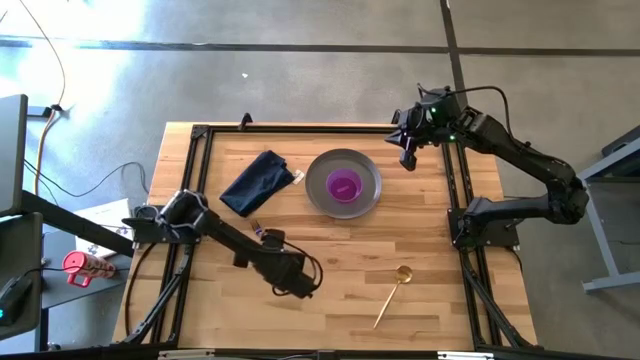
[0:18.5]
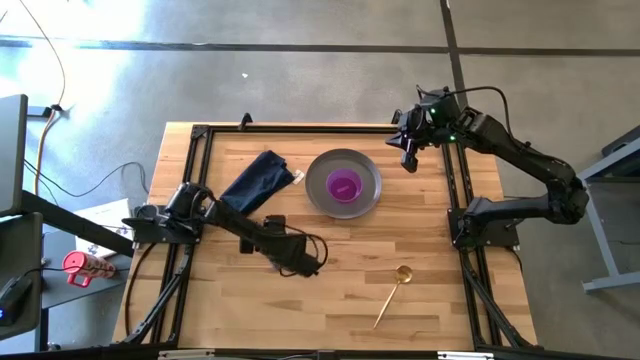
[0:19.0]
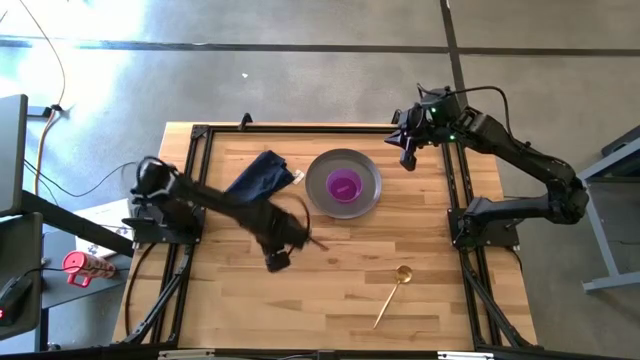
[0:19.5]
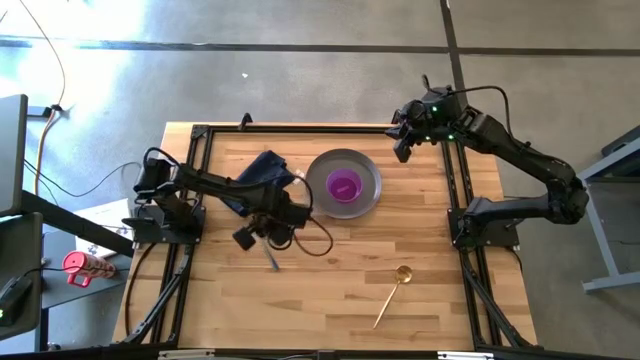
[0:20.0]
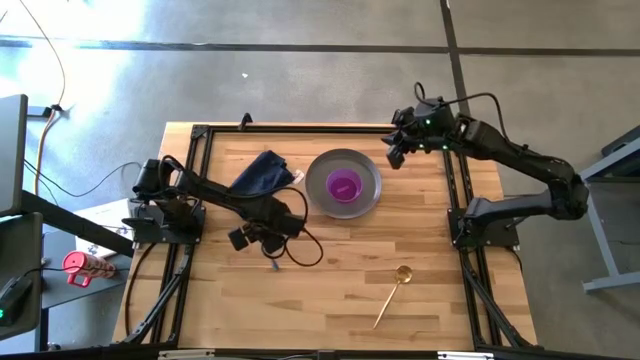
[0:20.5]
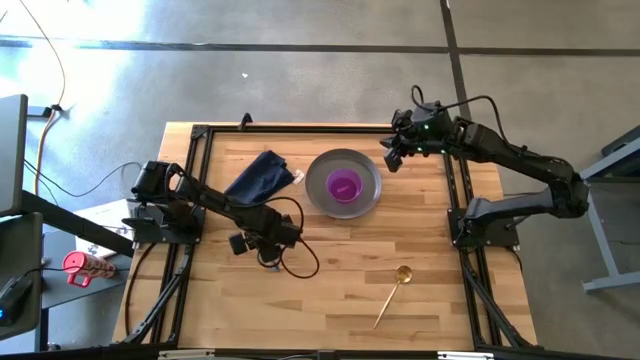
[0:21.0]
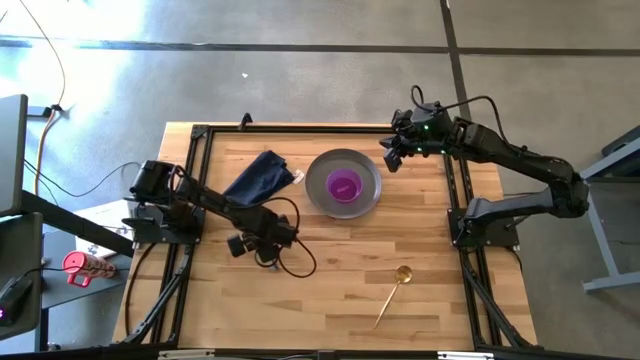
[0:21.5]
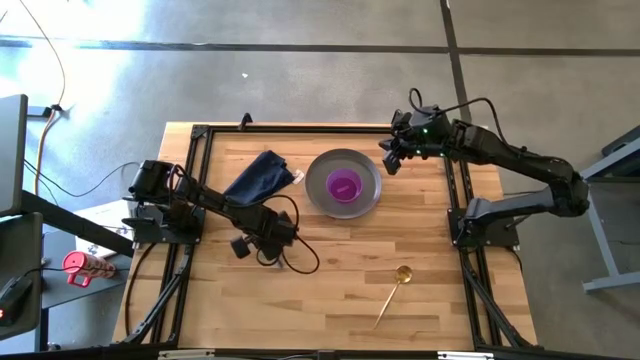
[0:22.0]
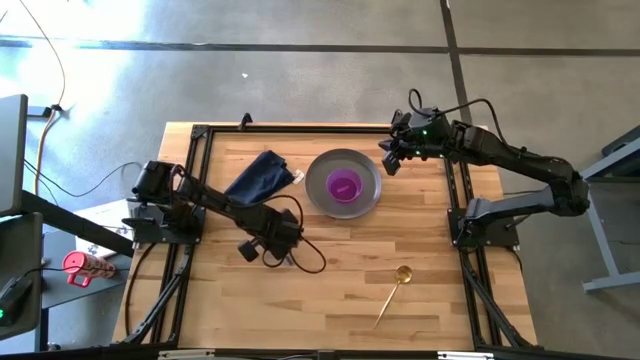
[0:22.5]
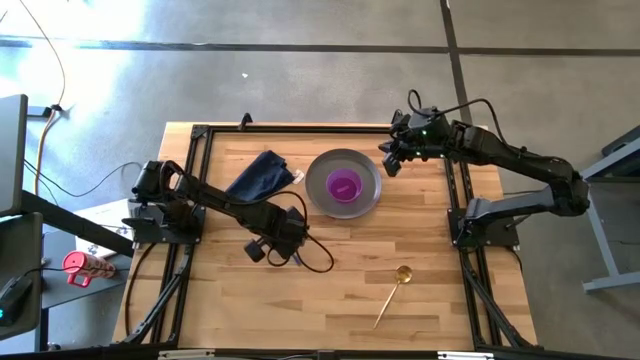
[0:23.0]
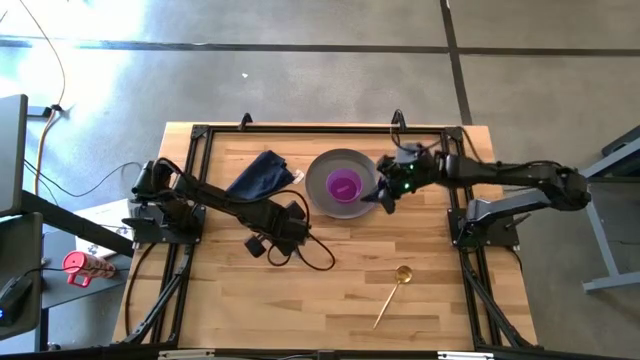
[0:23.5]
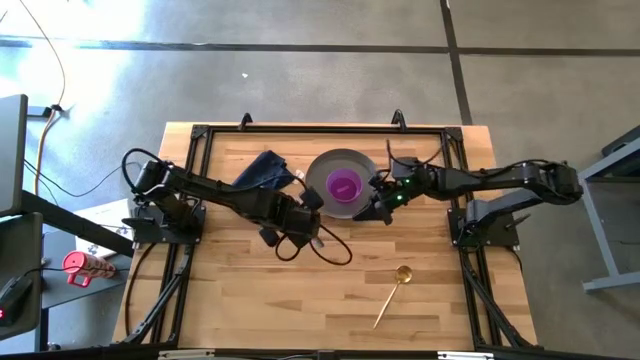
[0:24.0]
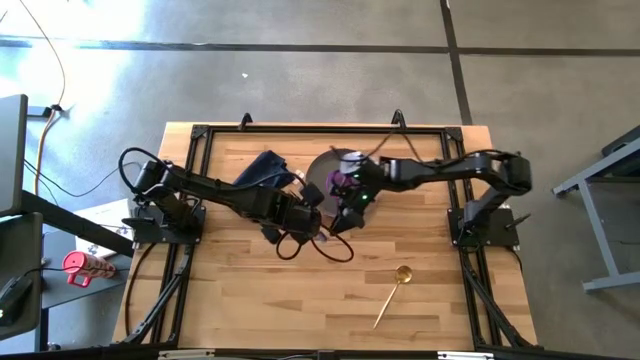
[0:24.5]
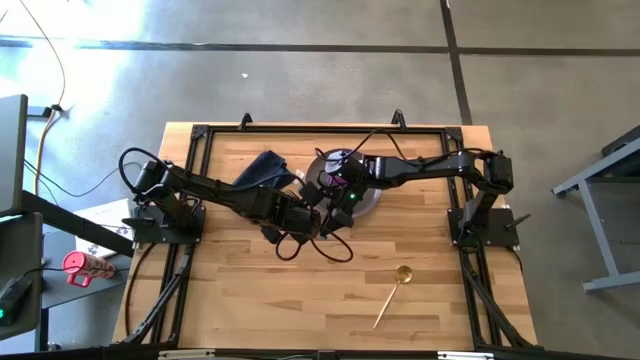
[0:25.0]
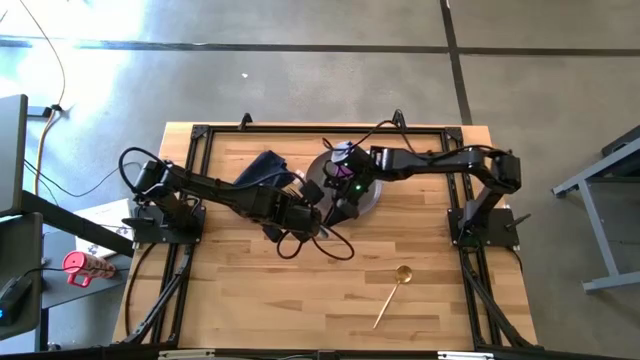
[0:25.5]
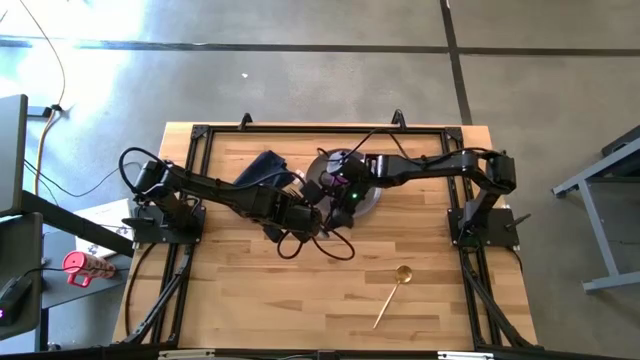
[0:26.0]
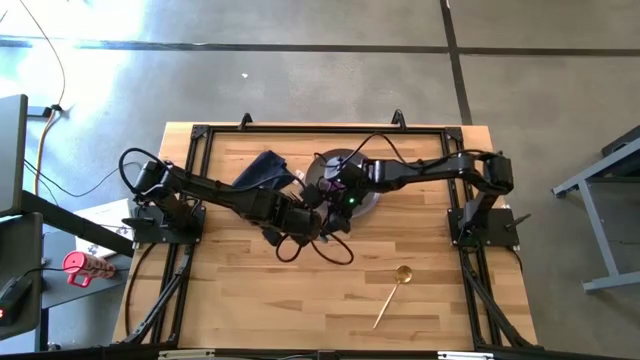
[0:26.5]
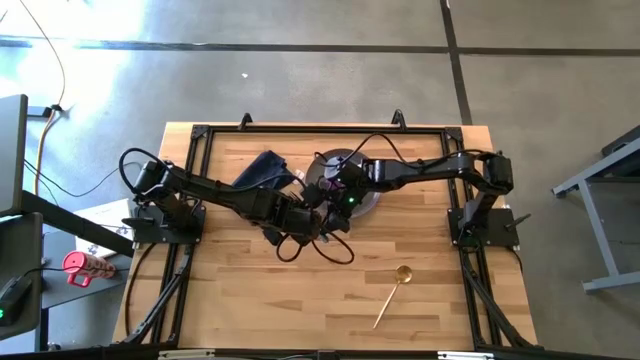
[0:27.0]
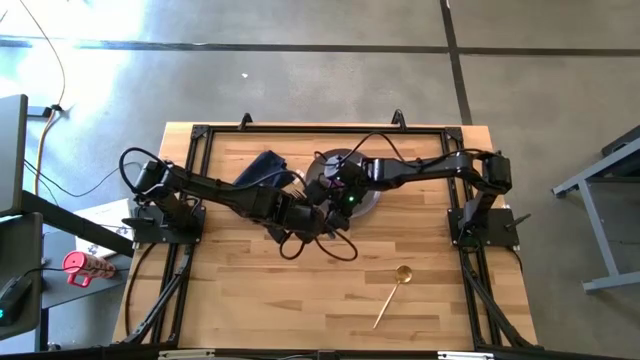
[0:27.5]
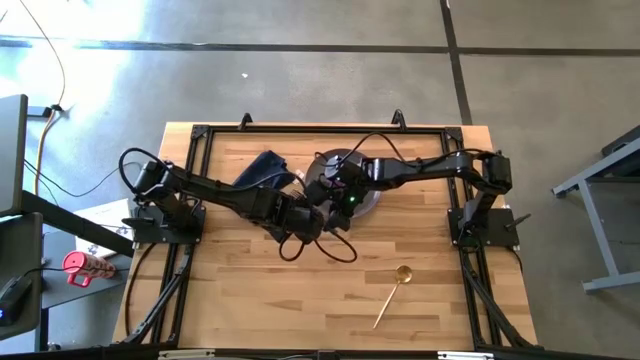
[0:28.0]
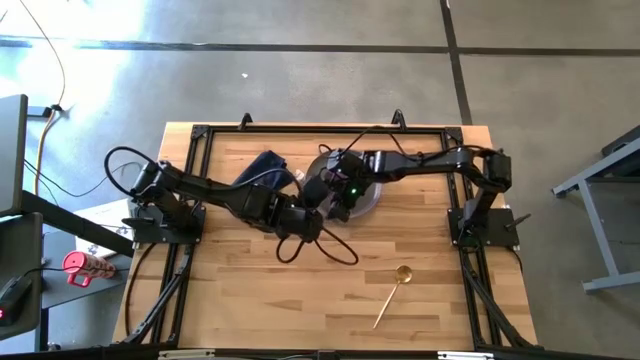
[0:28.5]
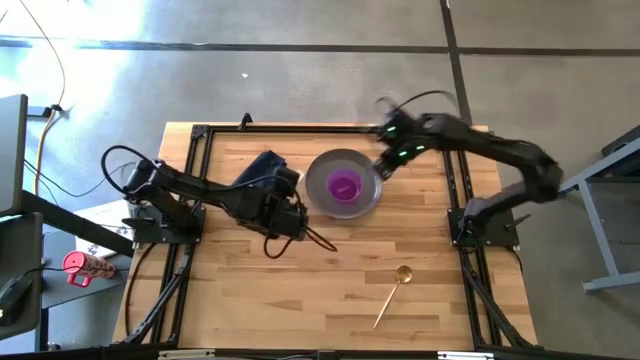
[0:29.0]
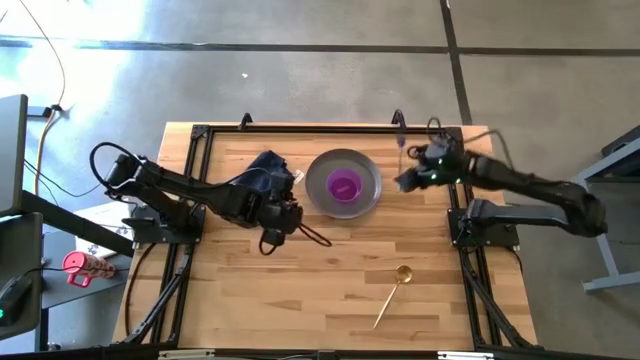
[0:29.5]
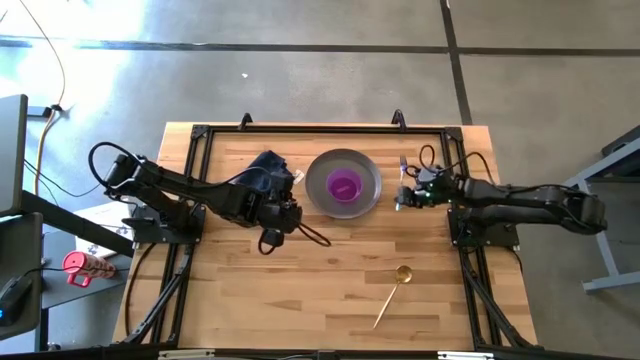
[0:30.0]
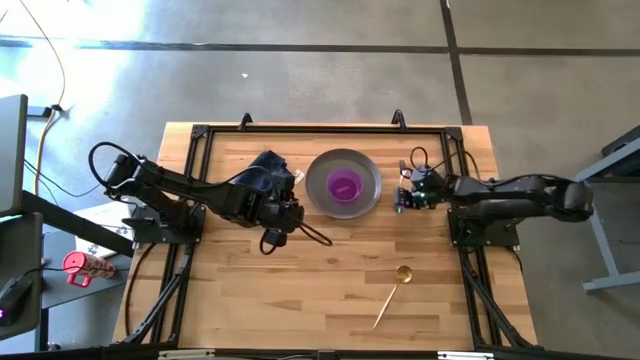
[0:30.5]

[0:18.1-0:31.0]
Task: Set table place
Put the blue fork to the right of the gray plate

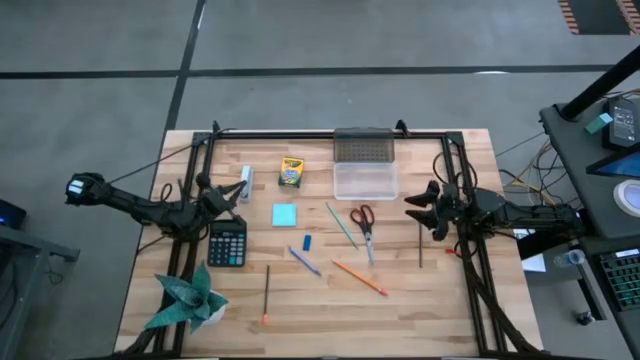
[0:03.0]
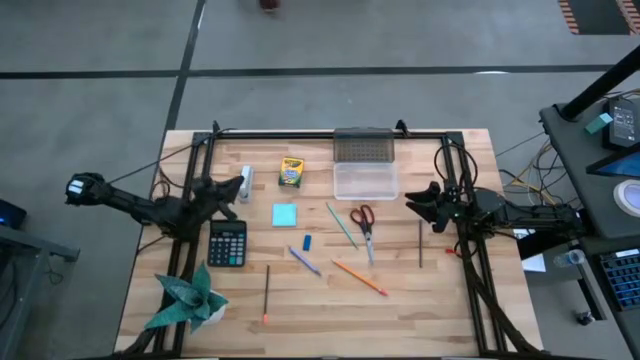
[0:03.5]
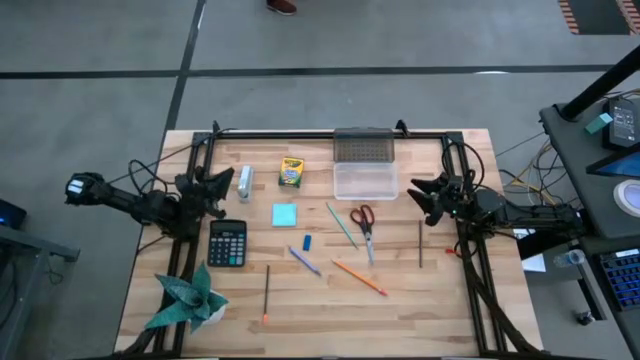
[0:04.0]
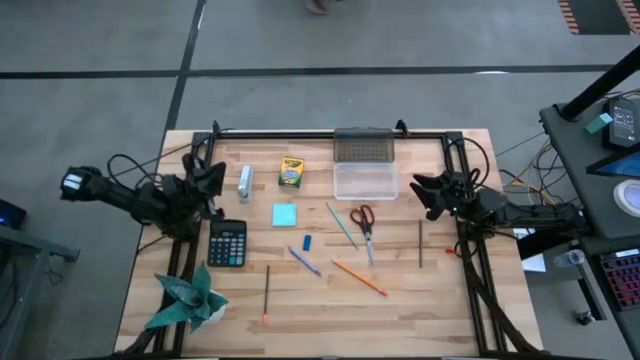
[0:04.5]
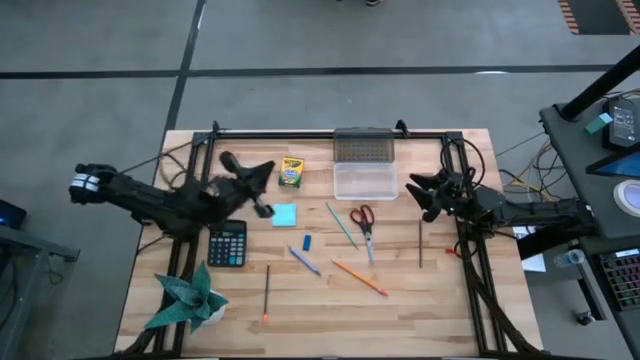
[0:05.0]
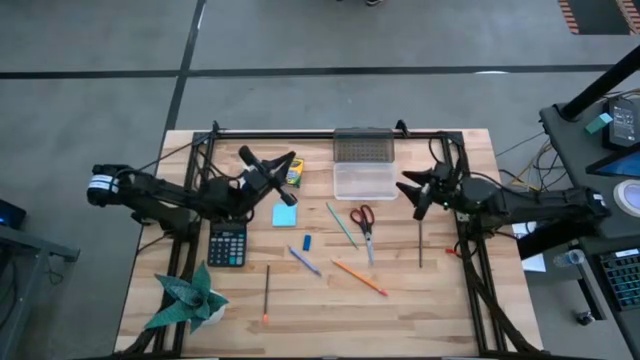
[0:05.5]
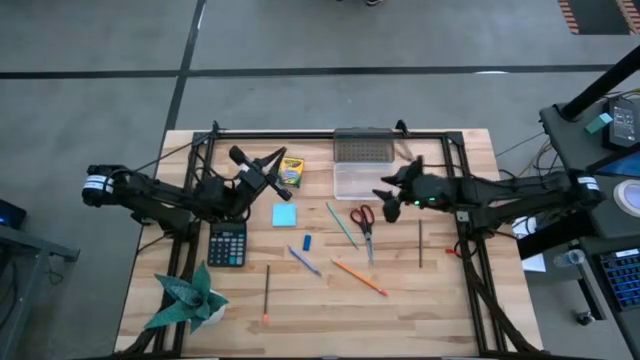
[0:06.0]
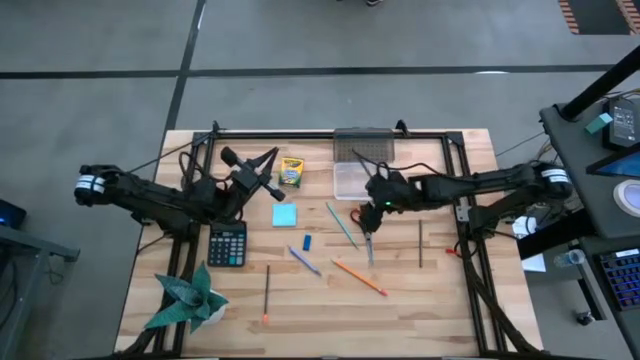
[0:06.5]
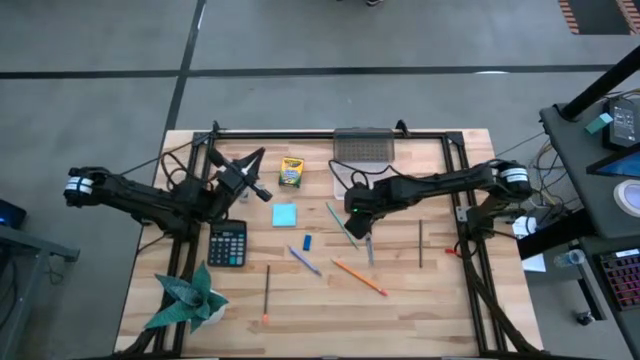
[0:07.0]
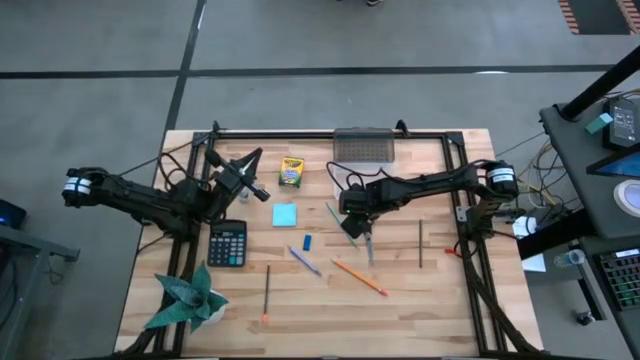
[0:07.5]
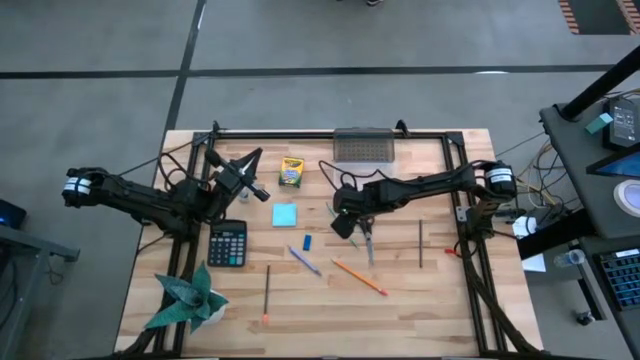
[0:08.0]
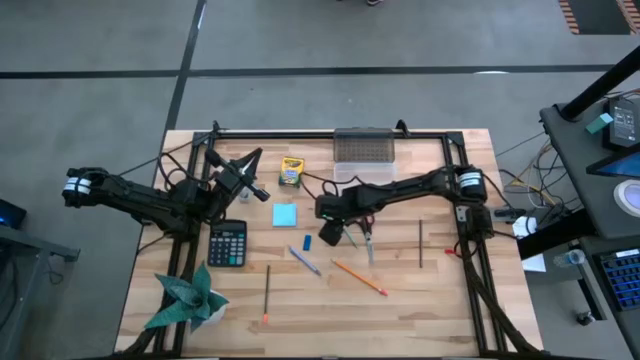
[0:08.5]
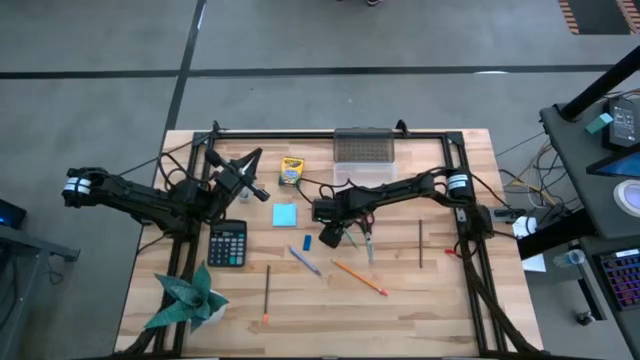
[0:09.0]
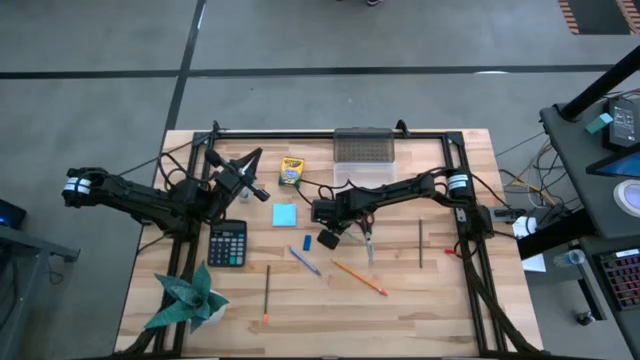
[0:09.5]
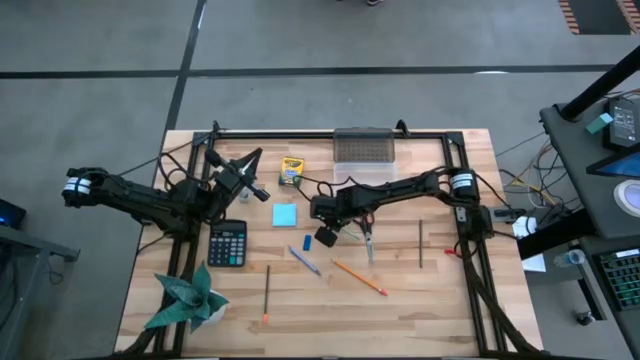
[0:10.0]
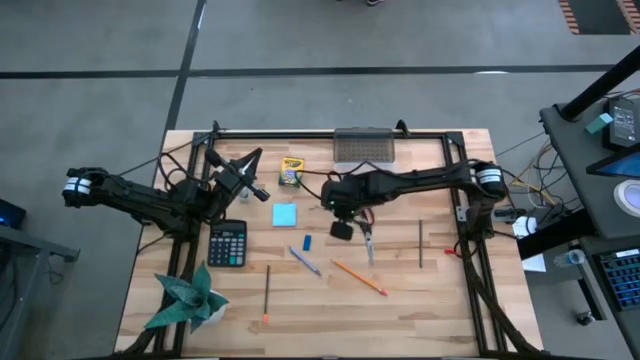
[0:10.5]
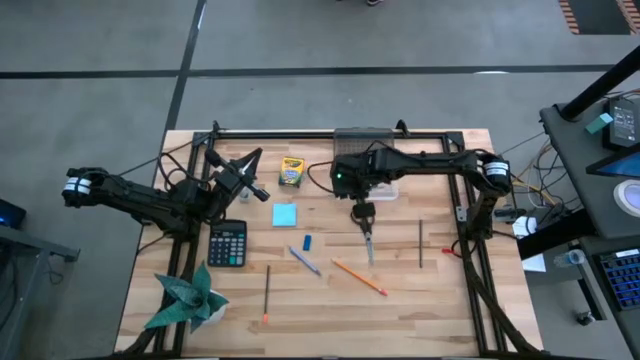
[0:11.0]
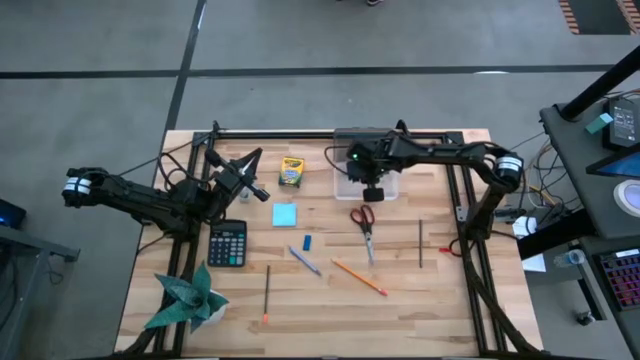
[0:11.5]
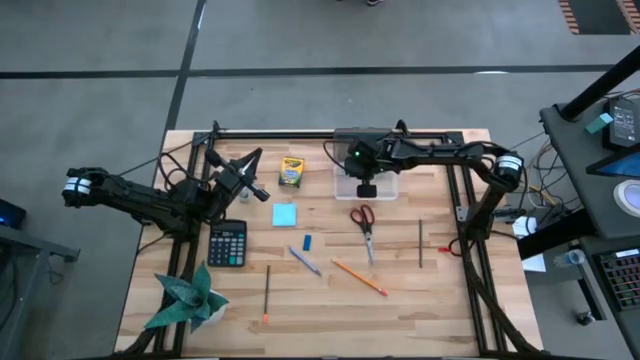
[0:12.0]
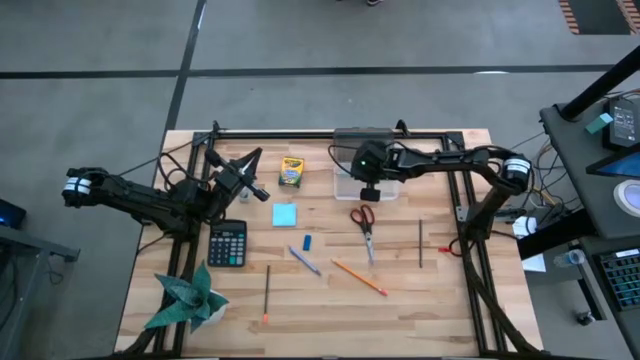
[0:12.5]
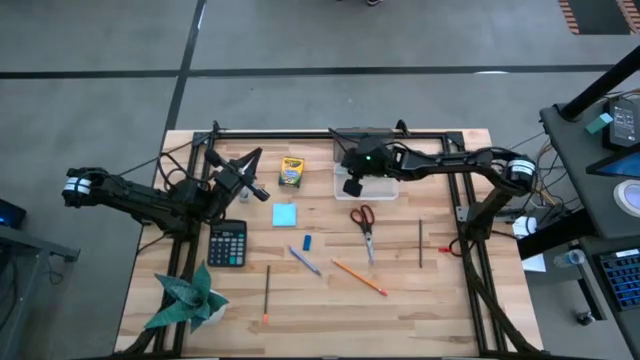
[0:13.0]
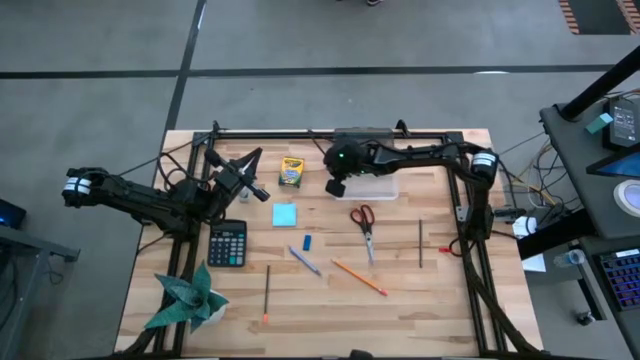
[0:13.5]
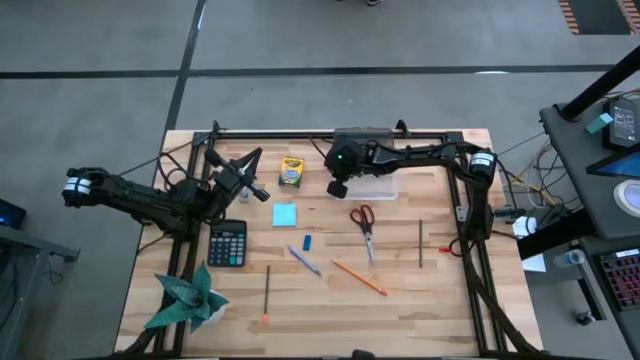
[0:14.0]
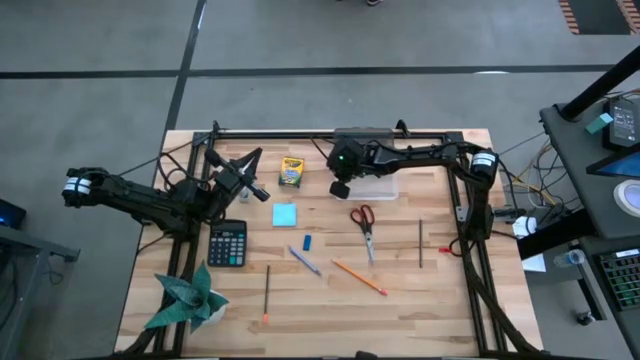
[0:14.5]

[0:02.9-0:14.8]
Task: Pack school essentials
Put the blue pencil into the transparent supply box
